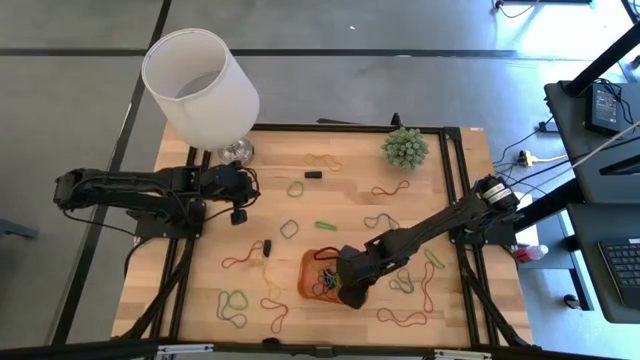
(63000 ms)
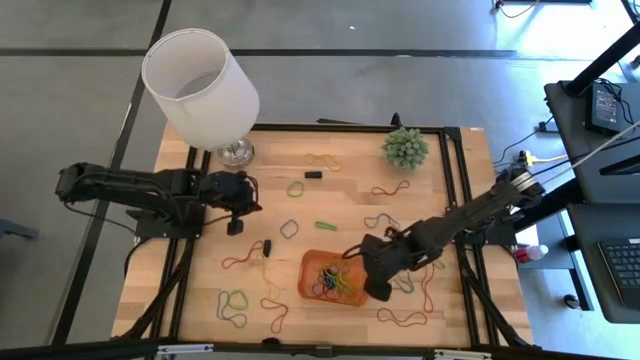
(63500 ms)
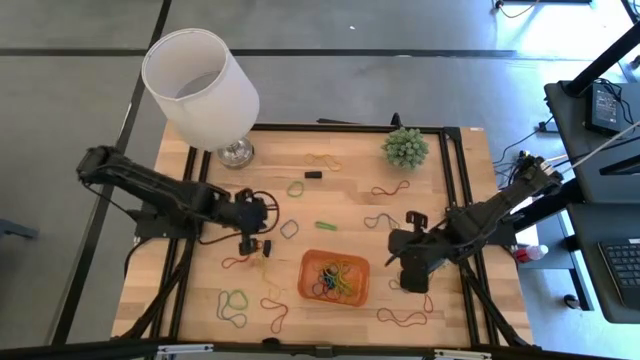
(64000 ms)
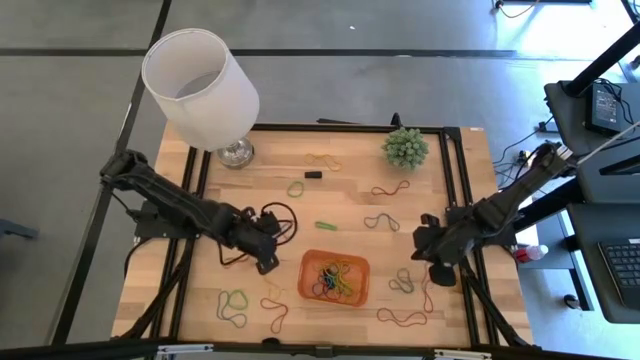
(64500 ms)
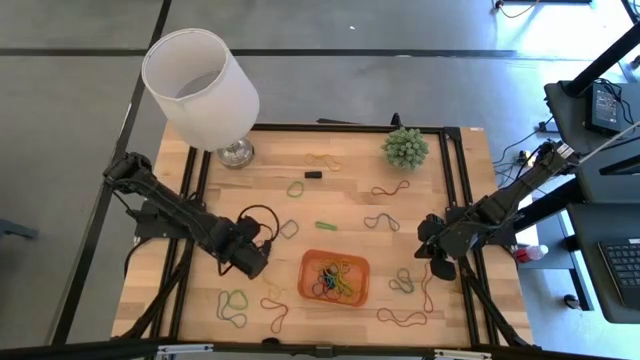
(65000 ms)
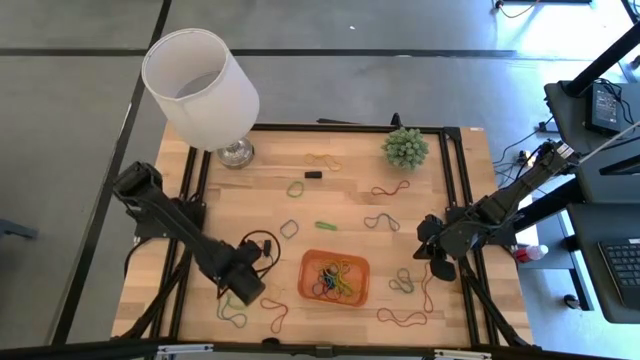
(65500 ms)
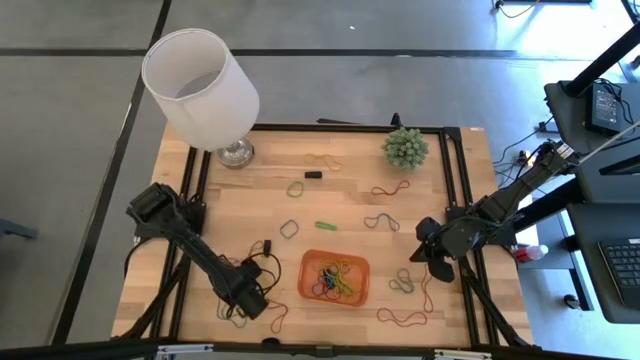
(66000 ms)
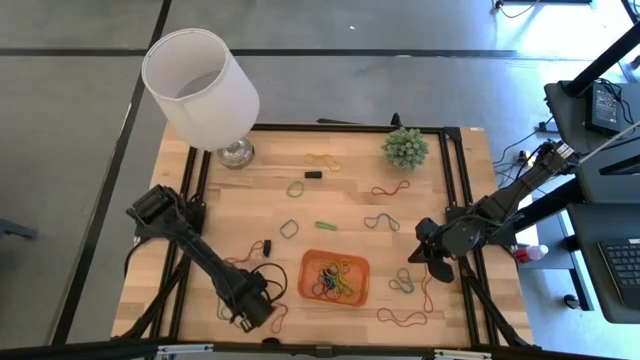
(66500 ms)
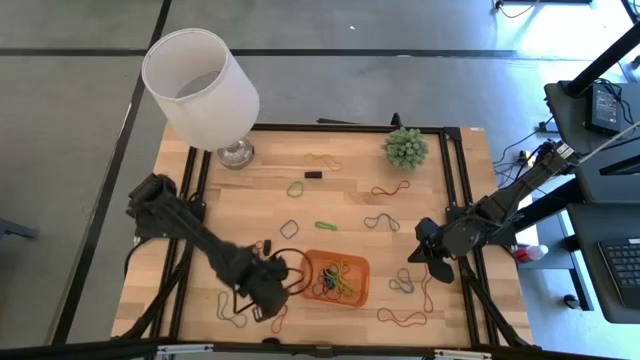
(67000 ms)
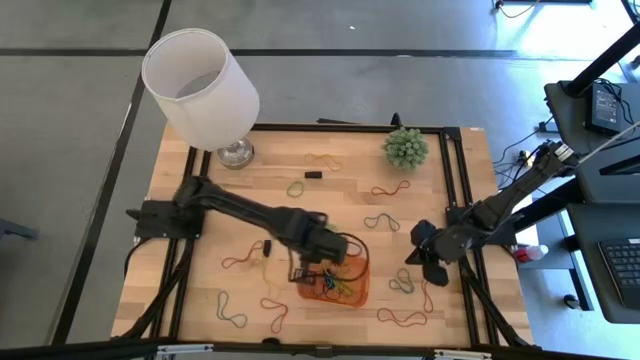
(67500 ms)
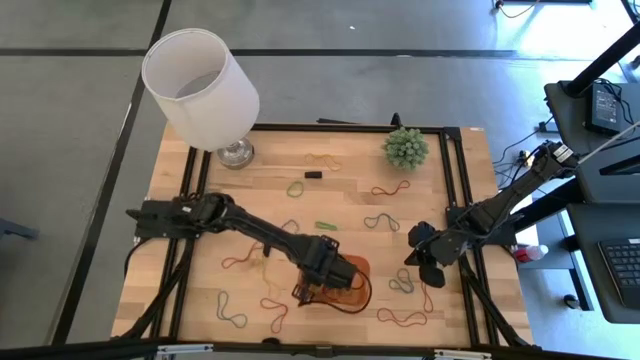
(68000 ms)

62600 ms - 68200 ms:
Task: Pick and place rubber bands into bin
Put the green rubber band into the orange bin

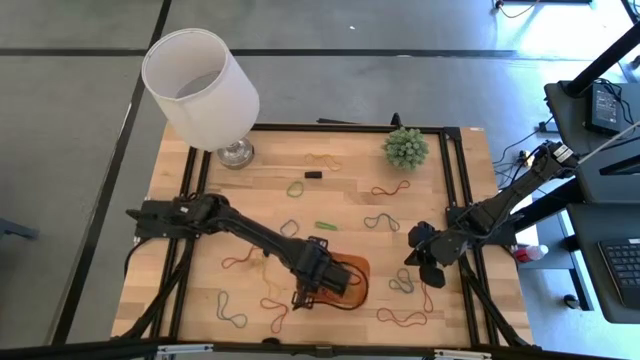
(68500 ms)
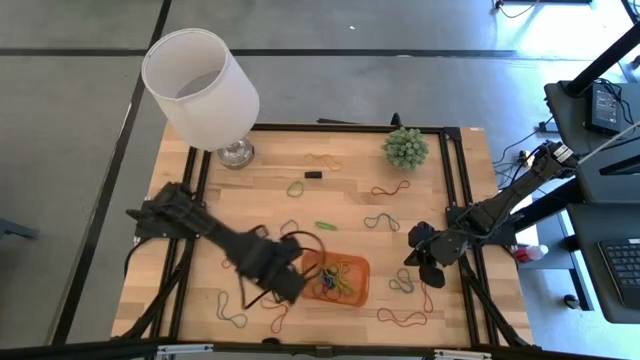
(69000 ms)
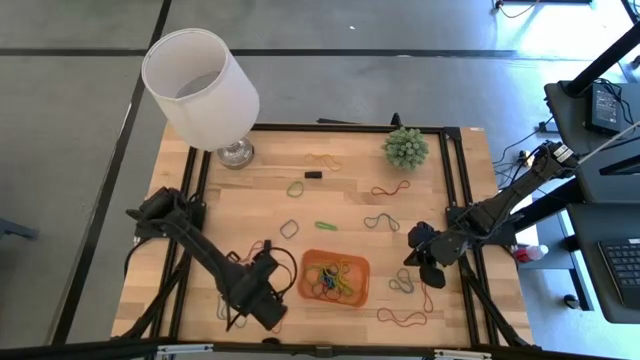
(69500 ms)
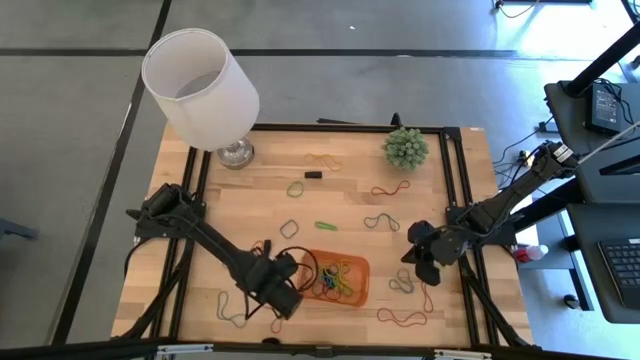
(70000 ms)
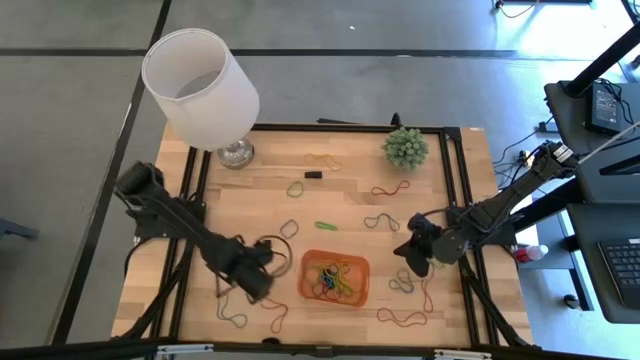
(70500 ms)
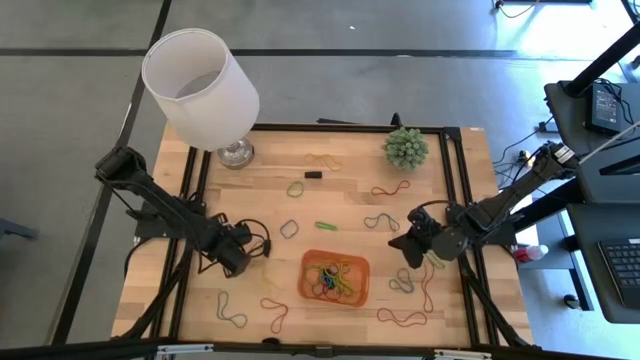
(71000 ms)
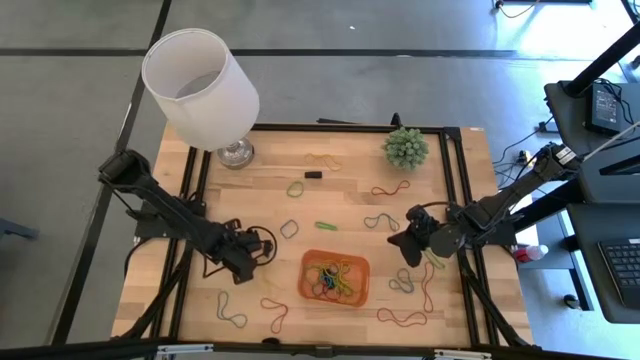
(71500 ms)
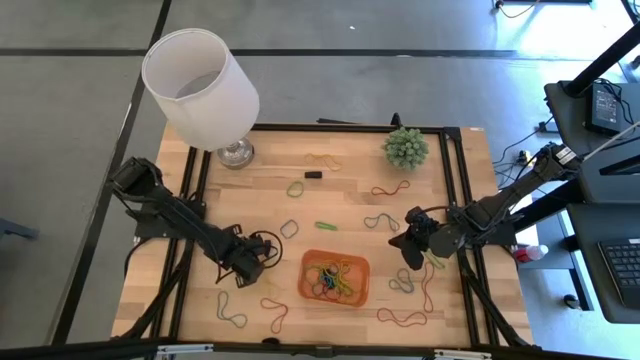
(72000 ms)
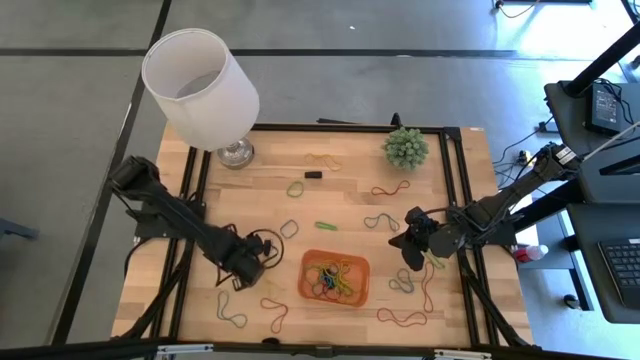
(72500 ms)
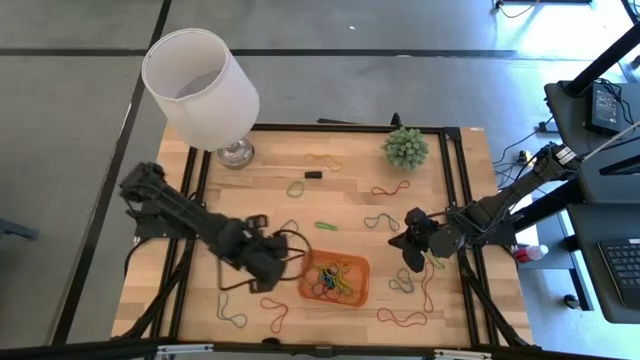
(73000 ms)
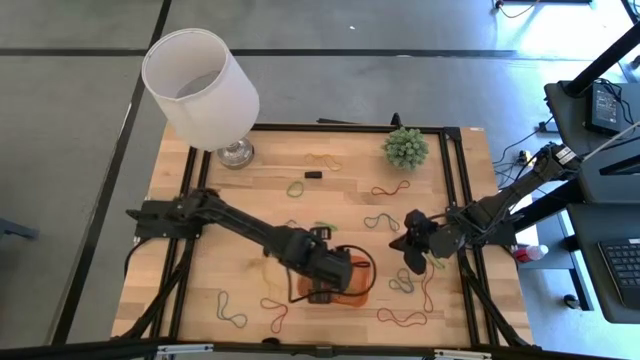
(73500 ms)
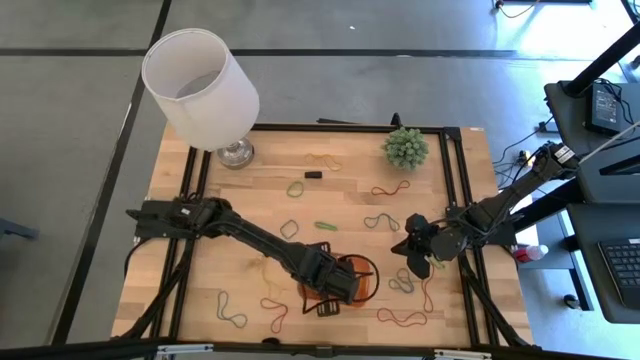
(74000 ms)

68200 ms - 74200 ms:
Put the red rubber band into the orange bin

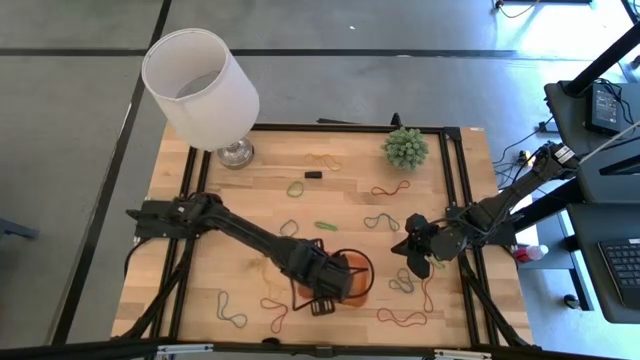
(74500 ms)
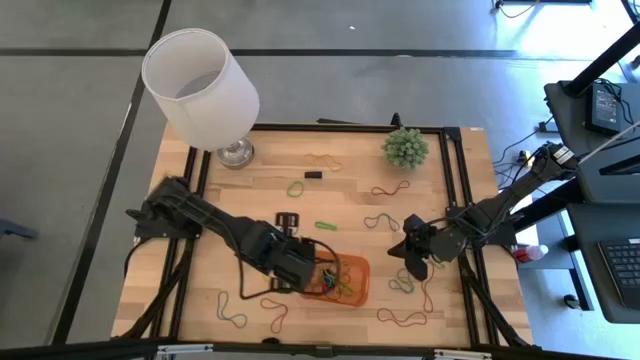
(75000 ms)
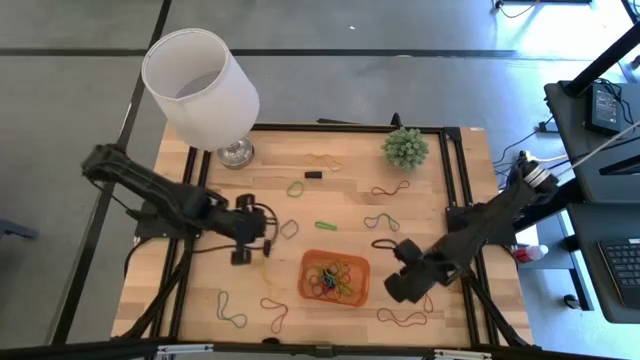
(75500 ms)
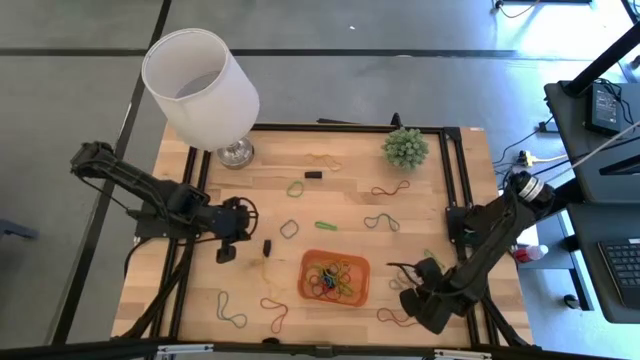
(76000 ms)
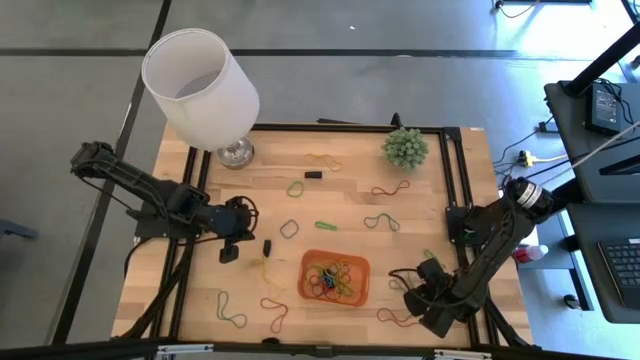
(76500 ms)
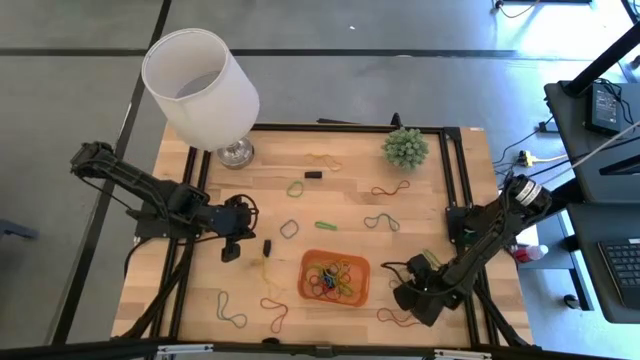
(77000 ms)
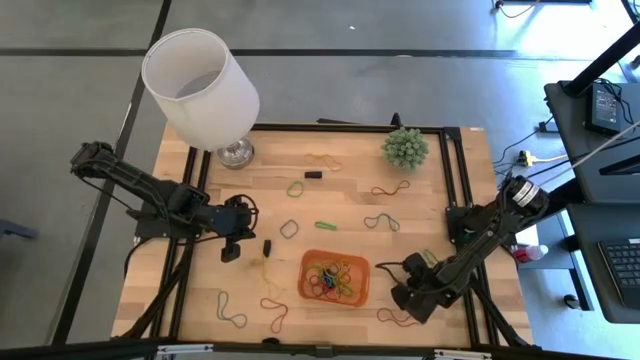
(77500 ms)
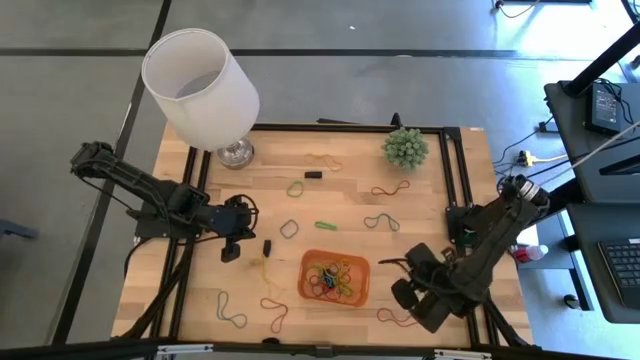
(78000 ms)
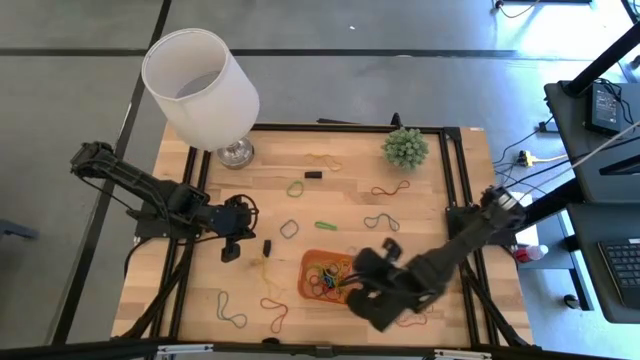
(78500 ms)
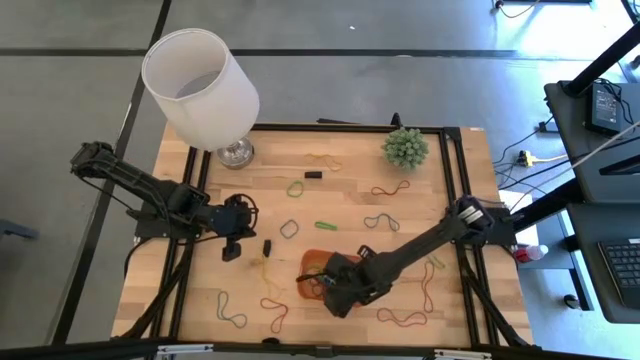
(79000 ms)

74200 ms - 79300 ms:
Put the blue rubber band into the orange bin

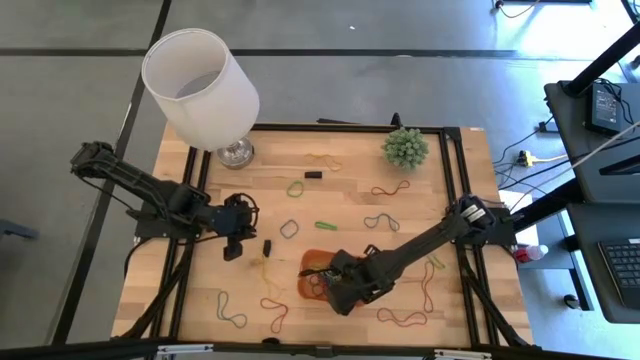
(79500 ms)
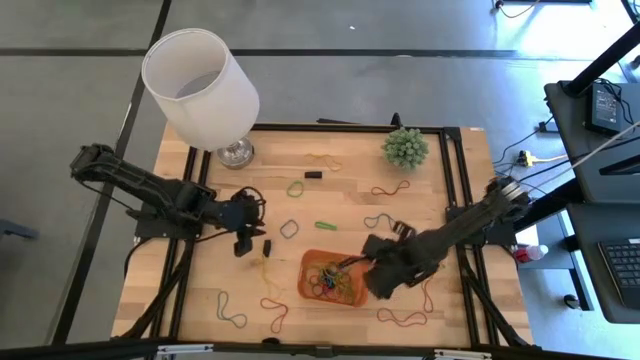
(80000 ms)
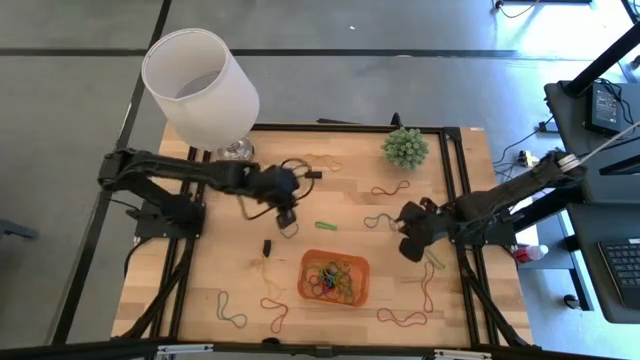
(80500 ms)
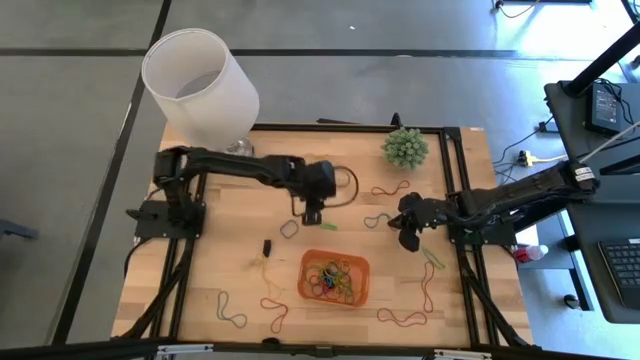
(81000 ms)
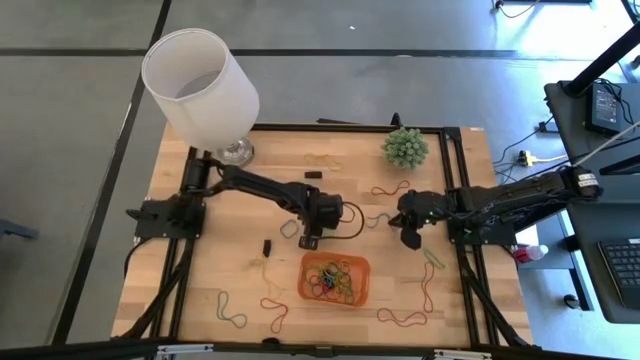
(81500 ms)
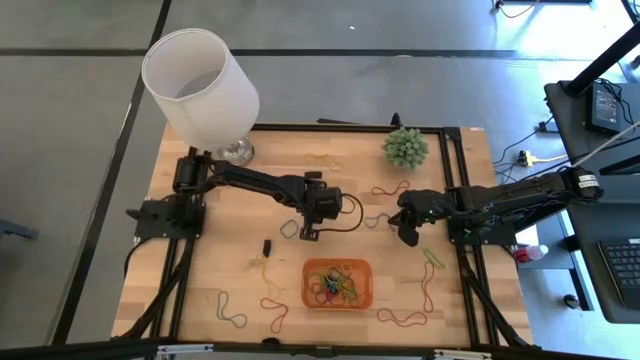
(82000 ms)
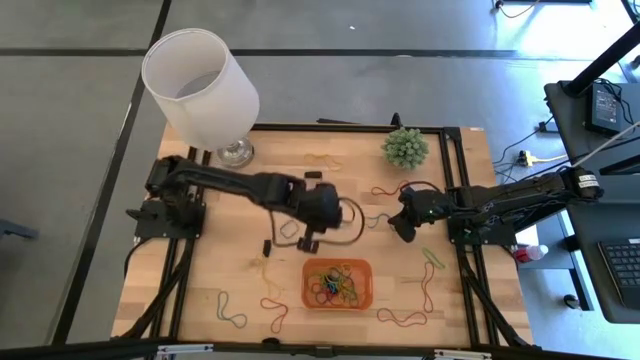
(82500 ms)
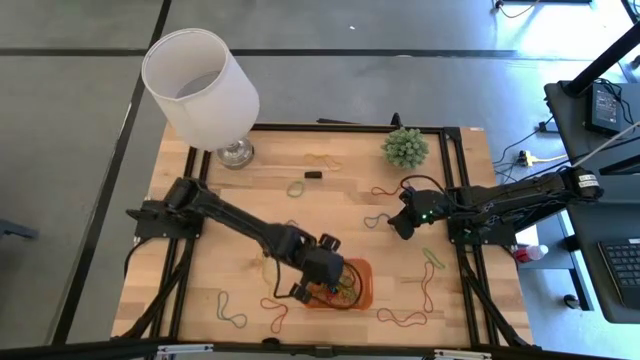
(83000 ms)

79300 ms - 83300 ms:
Put the green rubber band into the orange bin
